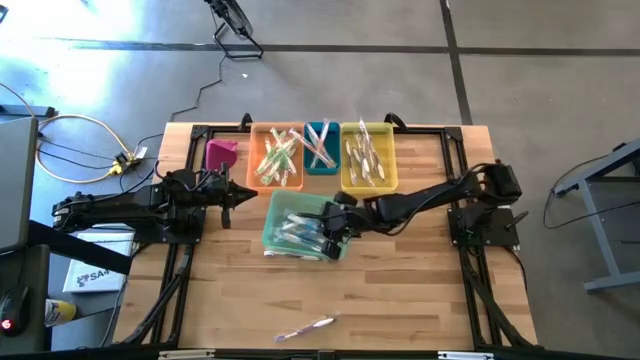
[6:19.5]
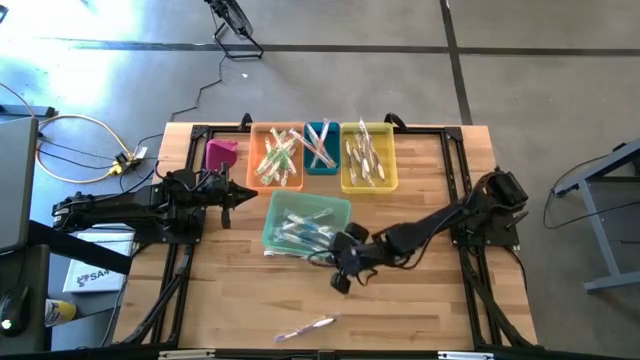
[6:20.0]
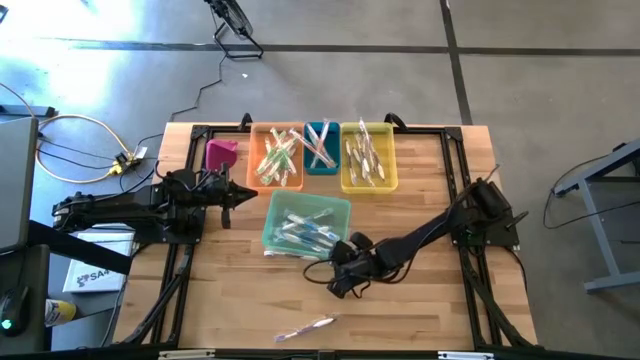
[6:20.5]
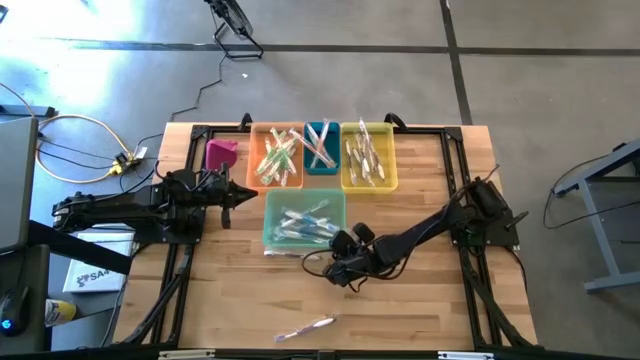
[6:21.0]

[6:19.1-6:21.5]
Task: Pick & Place Toothbrushes
Adjust the green bin

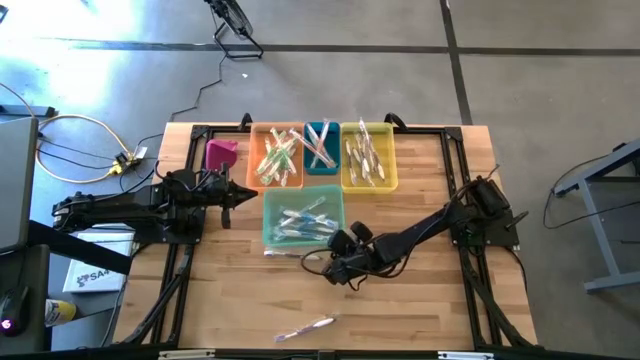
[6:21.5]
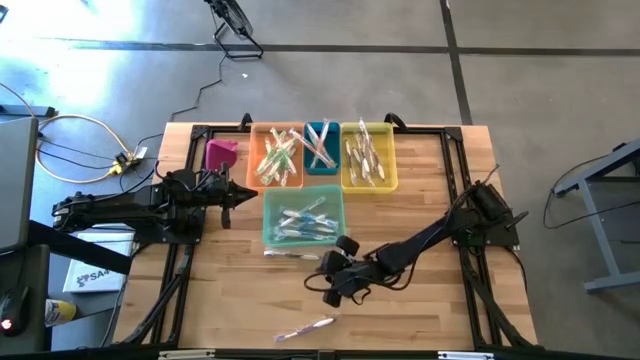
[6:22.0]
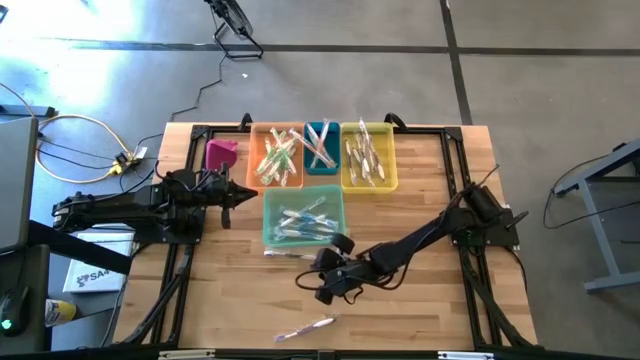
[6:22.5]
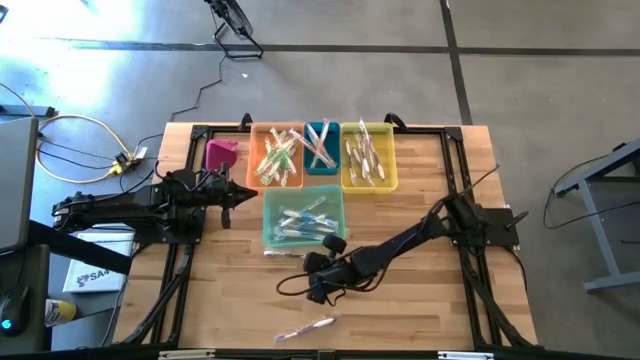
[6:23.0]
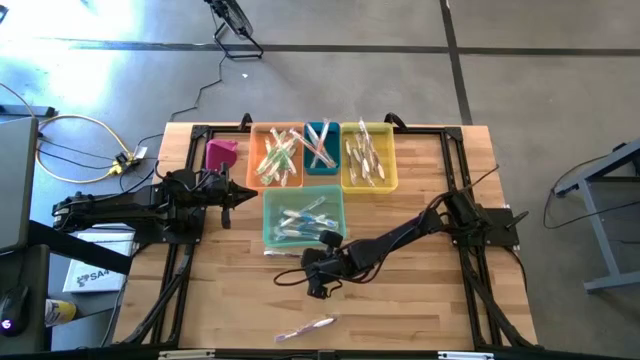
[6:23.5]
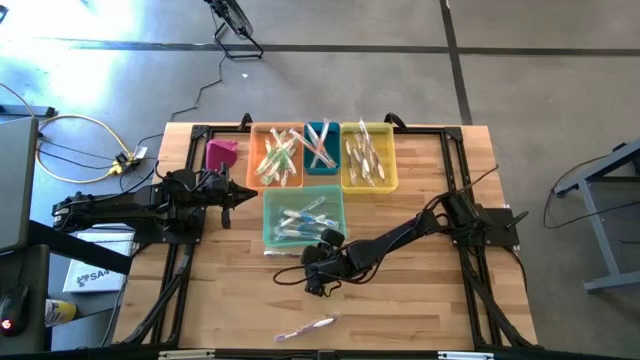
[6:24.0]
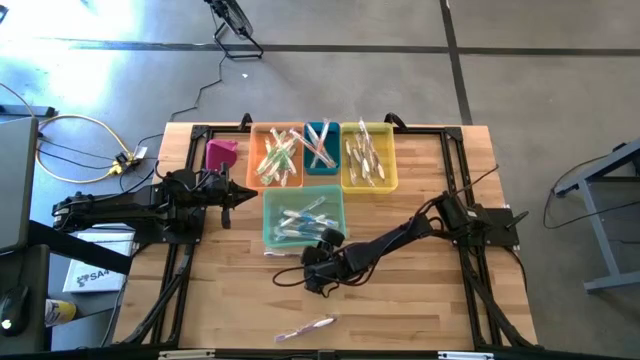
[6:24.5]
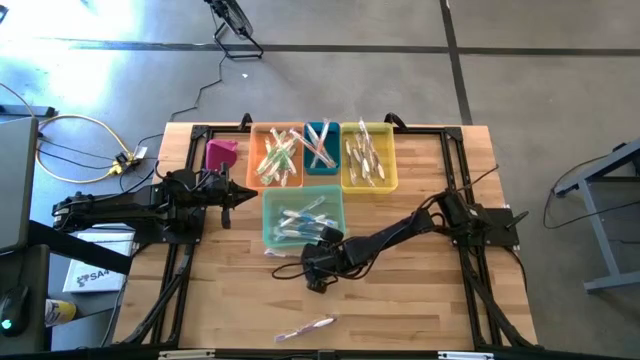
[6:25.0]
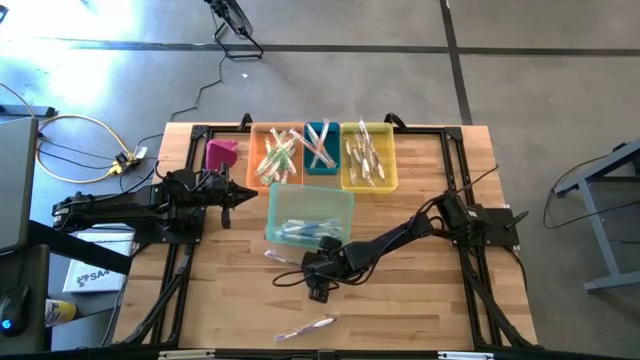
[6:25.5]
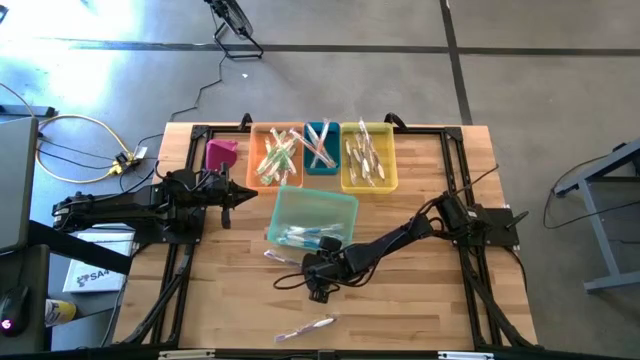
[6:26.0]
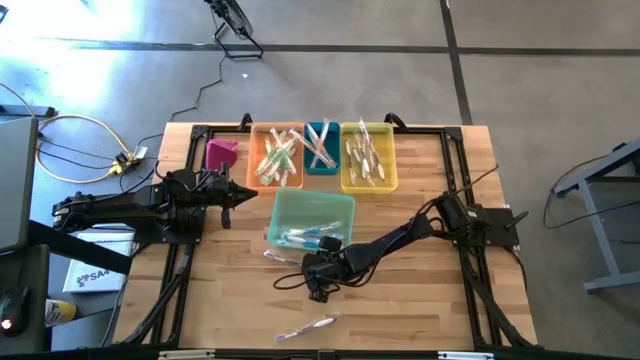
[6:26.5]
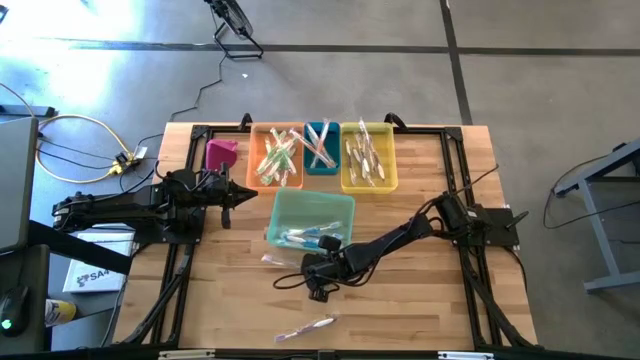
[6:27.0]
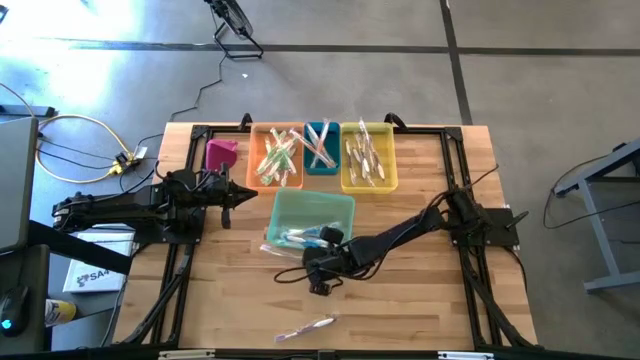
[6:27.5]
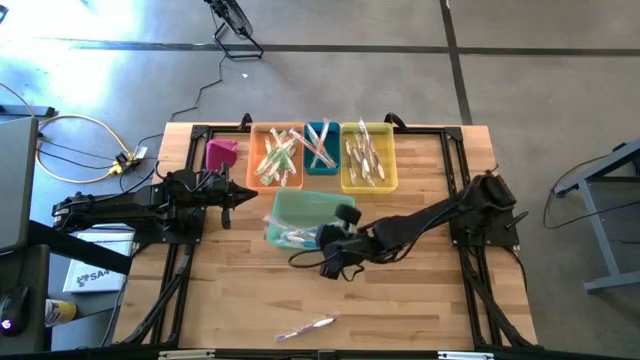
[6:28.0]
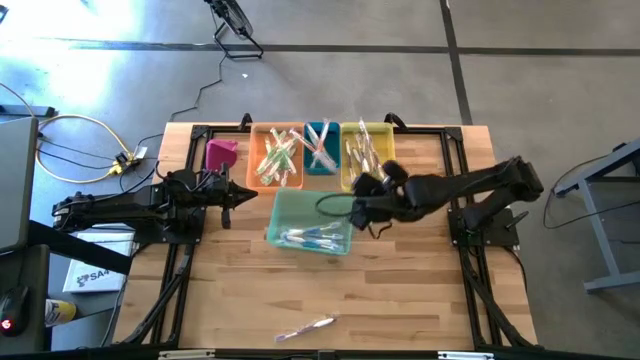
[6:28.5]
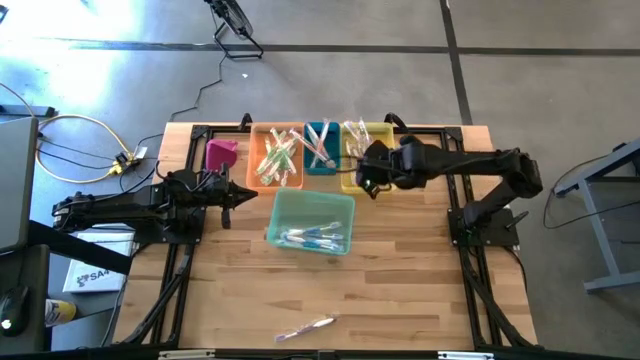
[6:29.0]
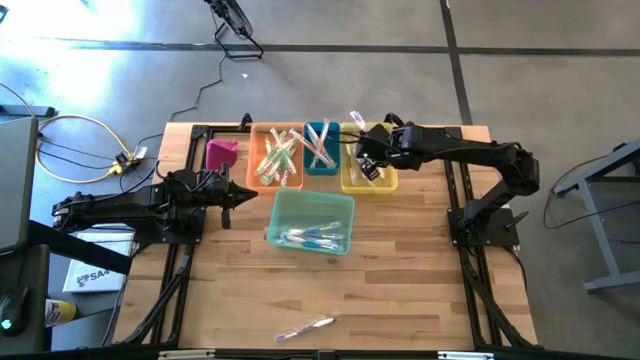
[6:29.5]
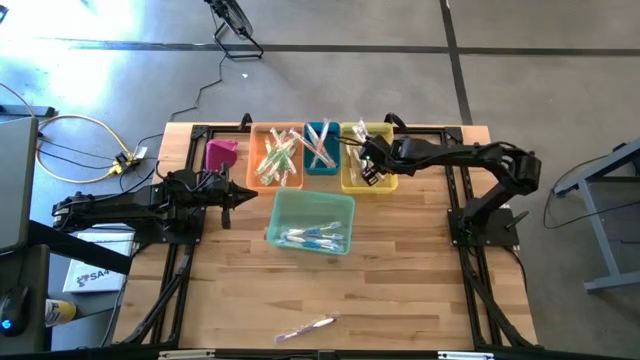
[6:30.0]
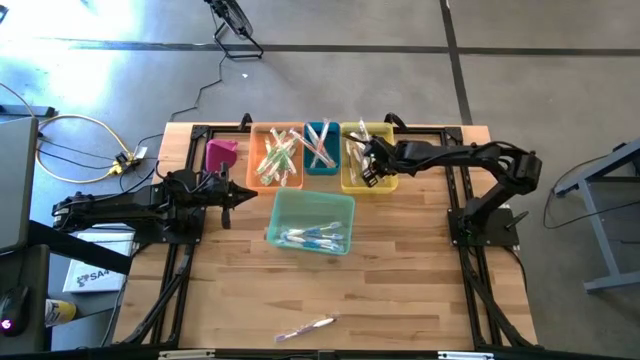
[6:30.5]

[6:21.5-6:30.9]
Put the purple toothbrush into the yellow bin

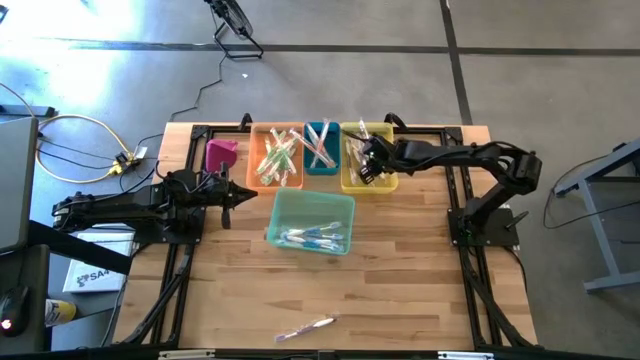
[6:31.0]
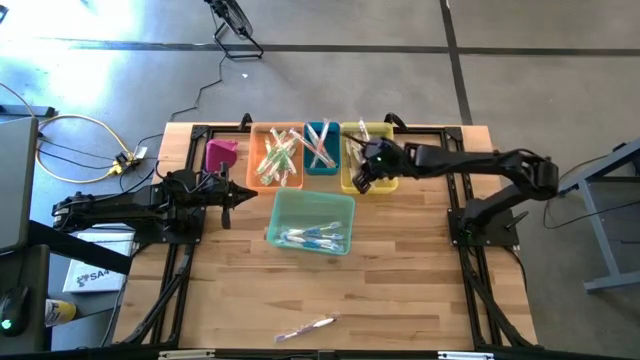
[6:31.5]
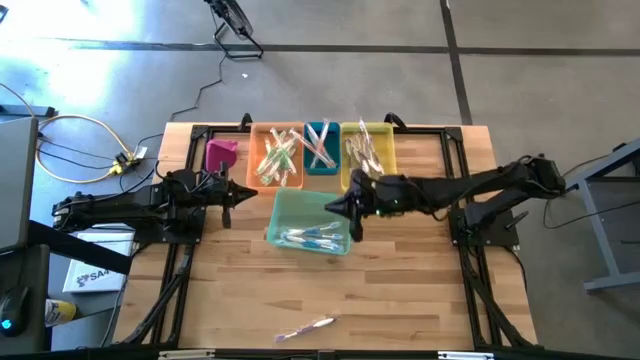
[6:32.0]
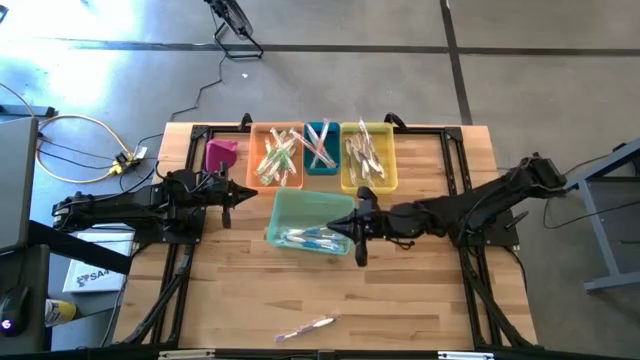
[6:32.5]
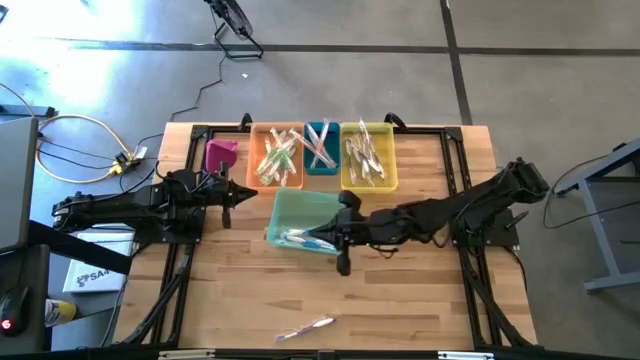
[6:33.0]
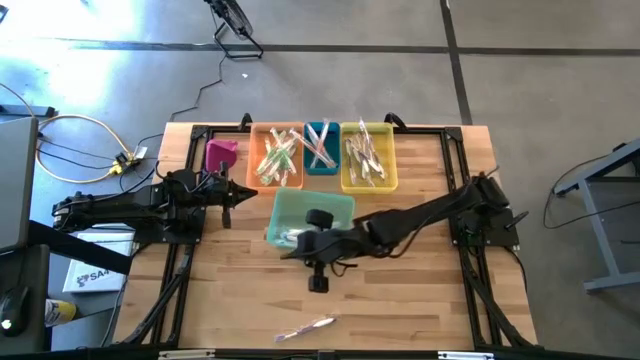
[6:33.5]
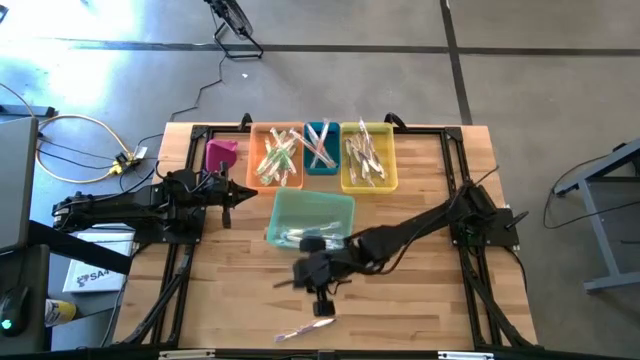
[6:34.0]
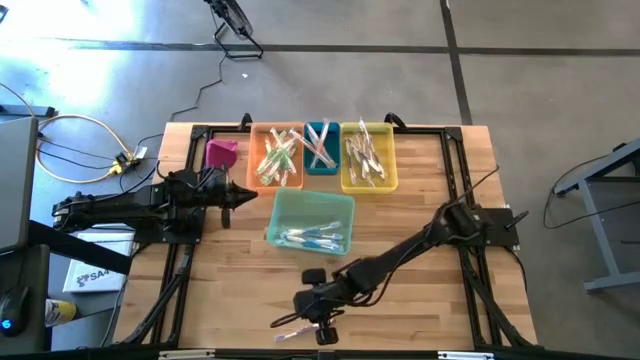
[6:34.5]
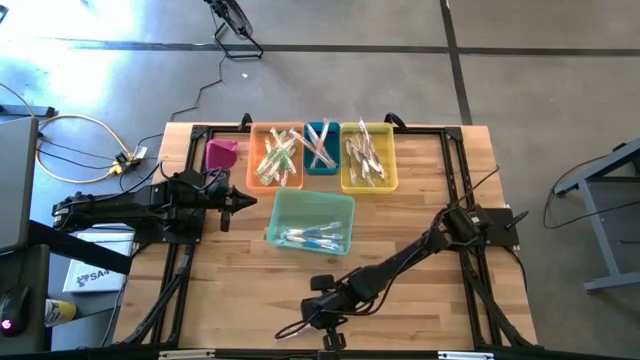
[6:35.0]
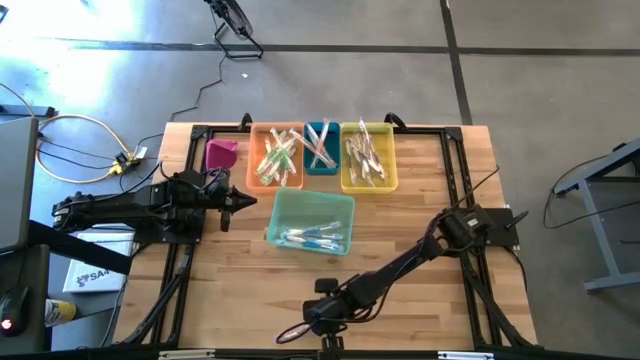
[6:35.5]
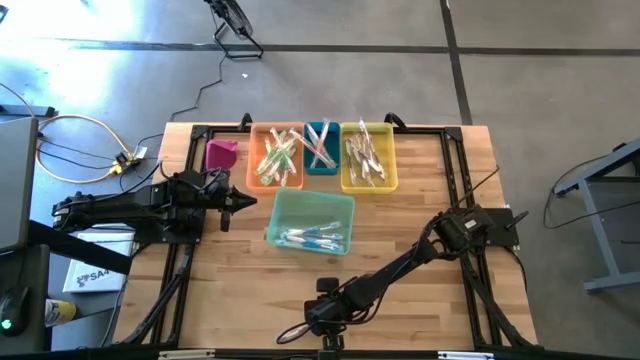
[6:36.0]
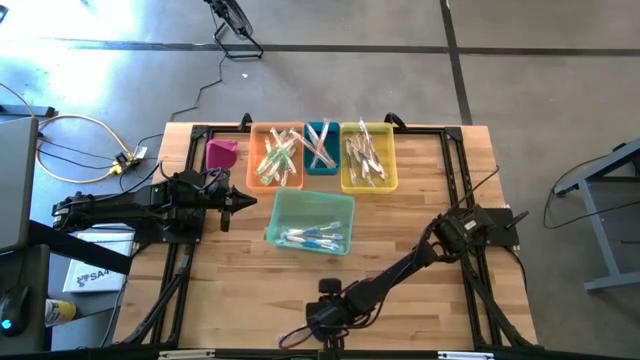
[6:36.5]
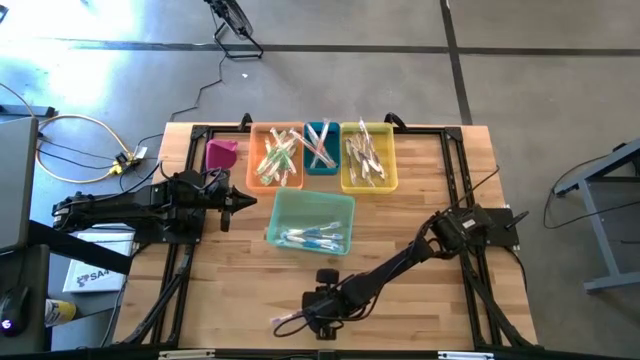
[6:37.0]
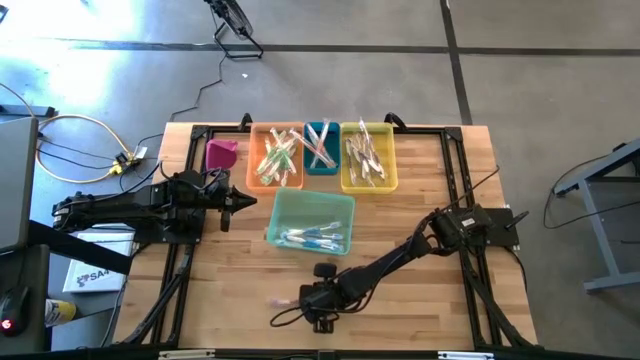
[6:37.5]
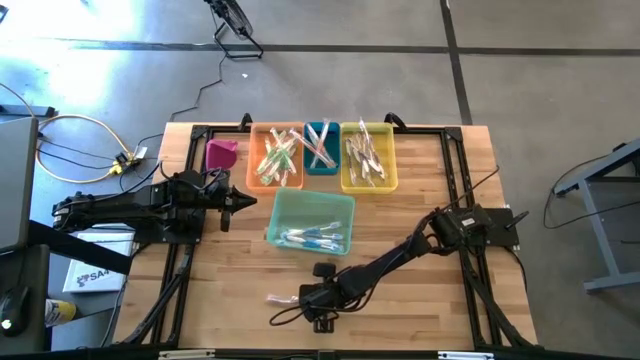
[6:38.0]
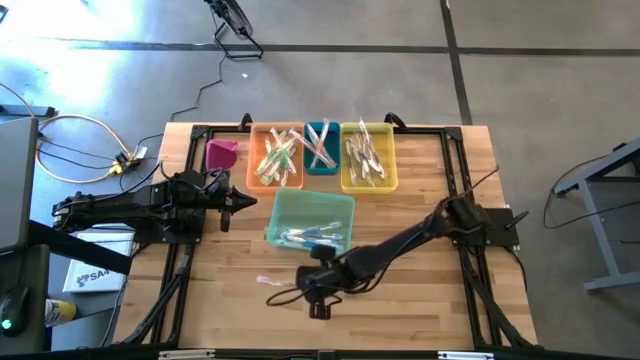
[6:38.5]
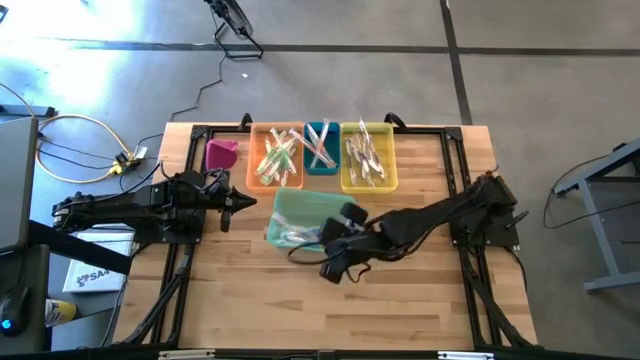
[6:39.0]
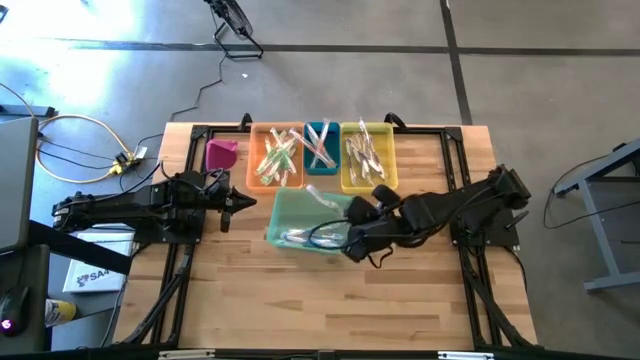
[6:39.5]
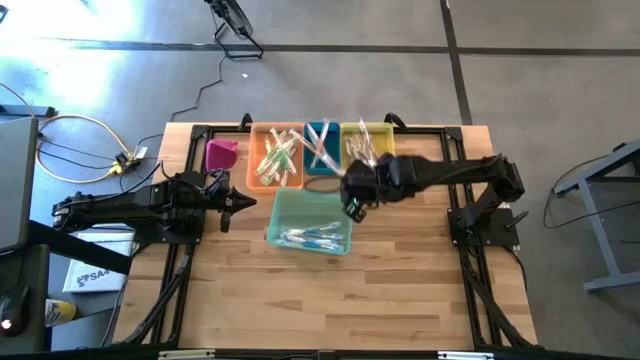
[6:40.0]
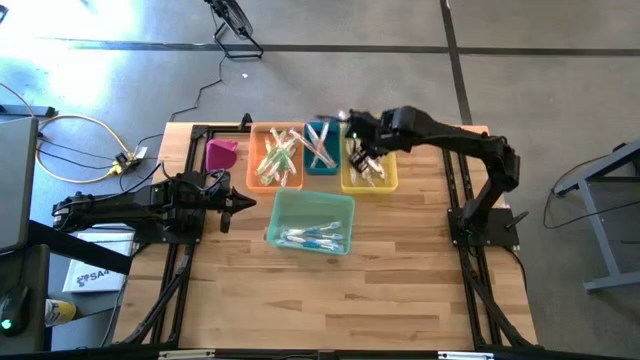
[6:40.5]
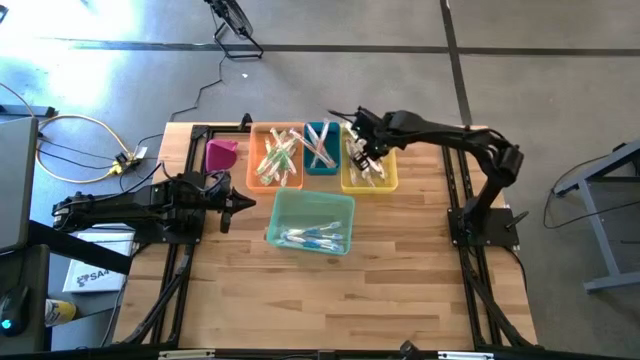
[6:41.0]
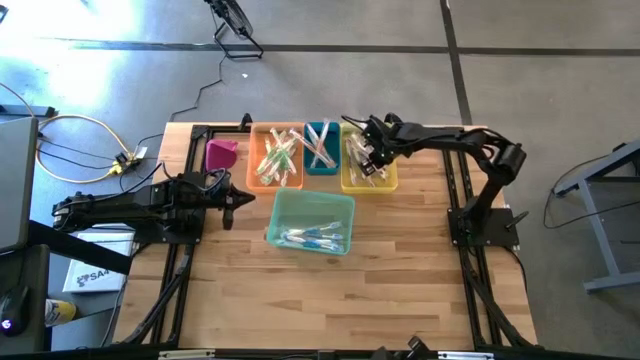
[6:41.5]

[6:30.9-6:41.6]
Put the purple toothbrush into the yellow bin
